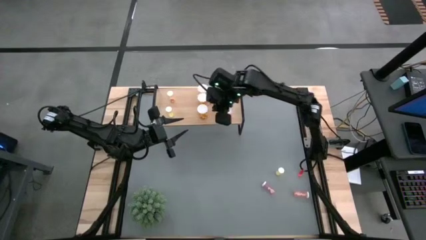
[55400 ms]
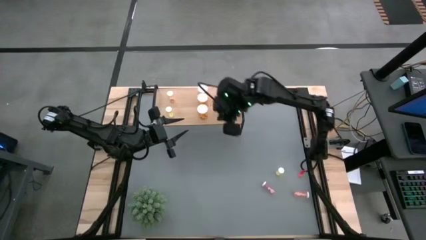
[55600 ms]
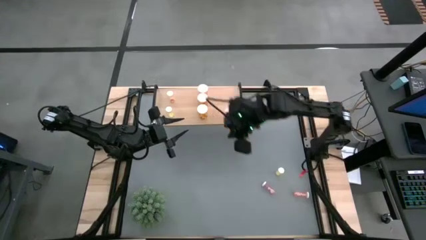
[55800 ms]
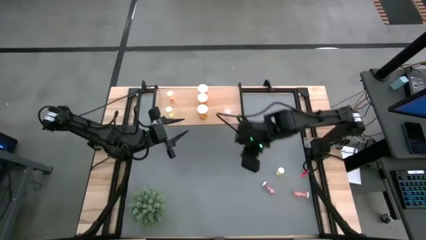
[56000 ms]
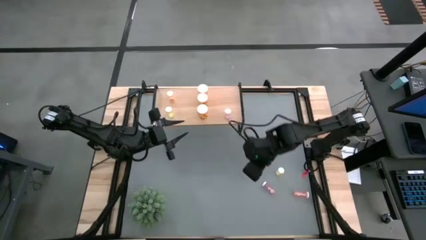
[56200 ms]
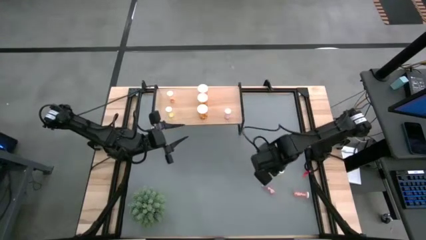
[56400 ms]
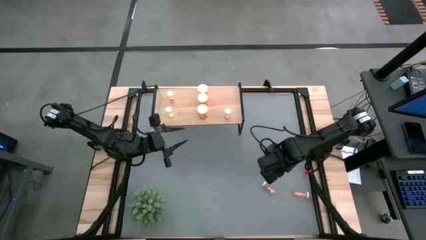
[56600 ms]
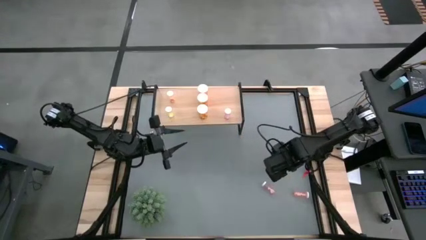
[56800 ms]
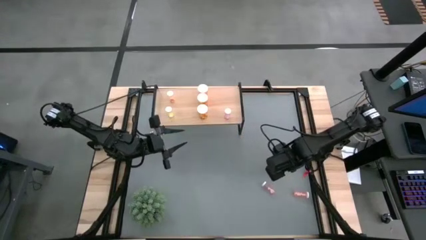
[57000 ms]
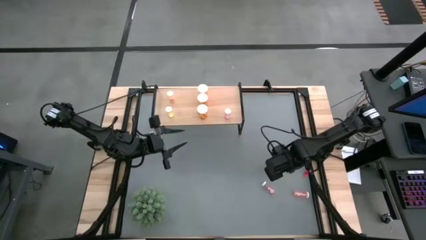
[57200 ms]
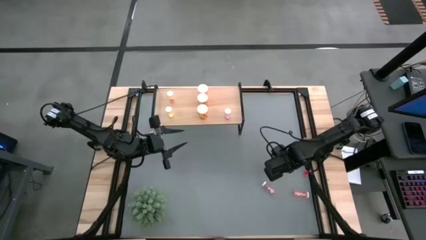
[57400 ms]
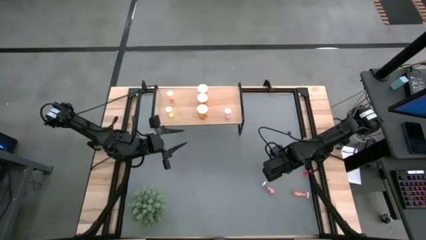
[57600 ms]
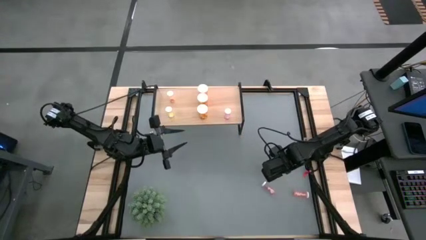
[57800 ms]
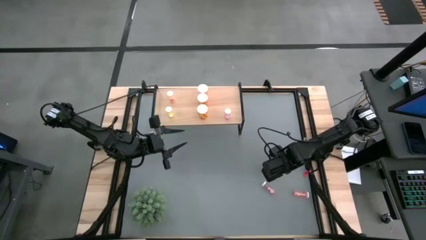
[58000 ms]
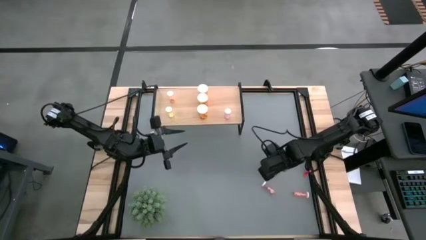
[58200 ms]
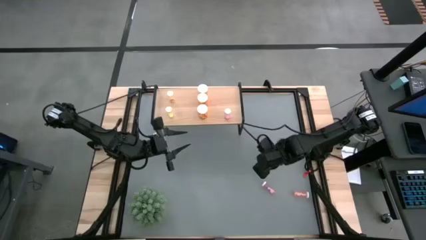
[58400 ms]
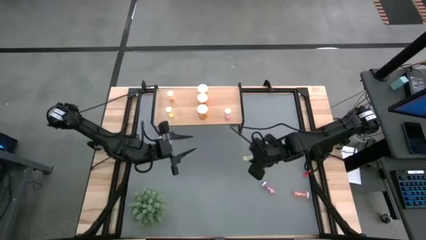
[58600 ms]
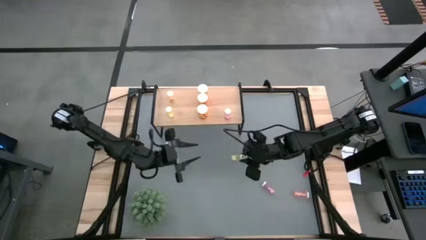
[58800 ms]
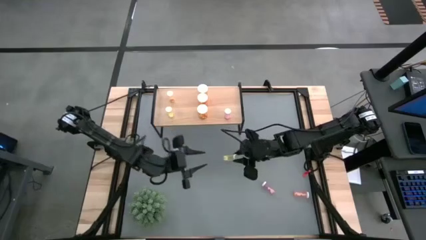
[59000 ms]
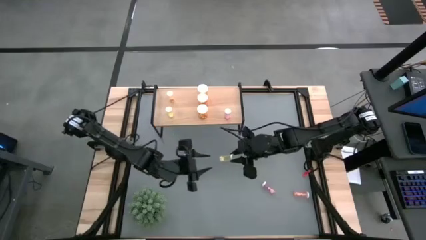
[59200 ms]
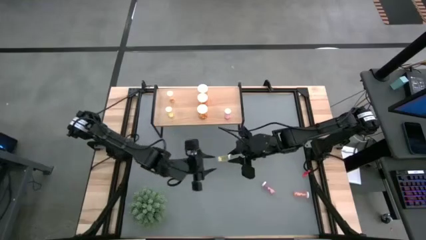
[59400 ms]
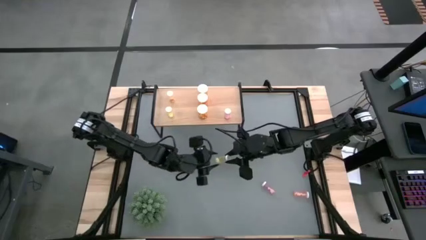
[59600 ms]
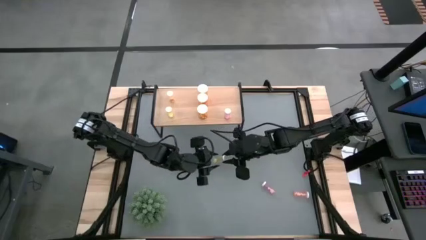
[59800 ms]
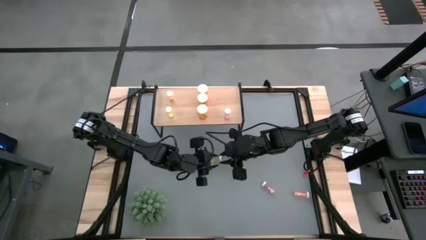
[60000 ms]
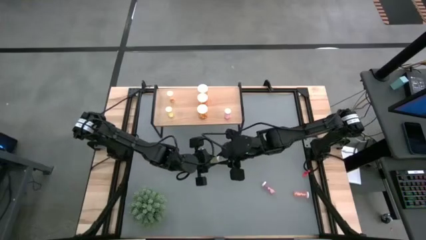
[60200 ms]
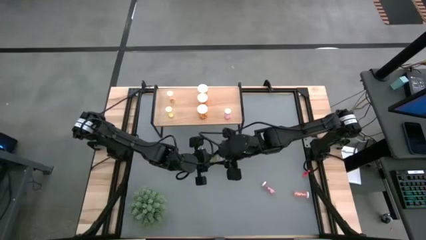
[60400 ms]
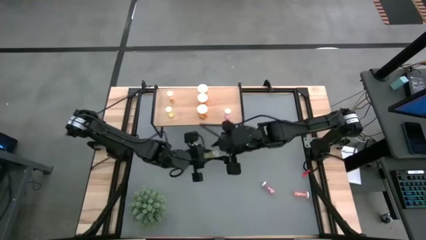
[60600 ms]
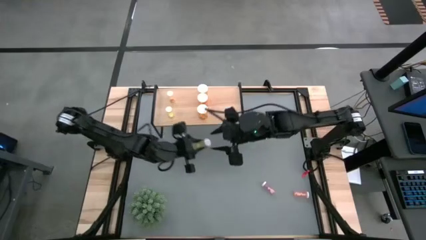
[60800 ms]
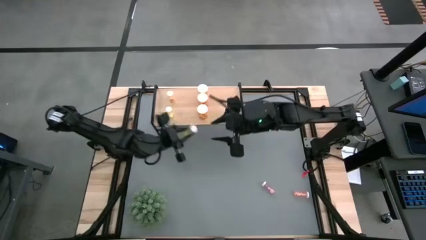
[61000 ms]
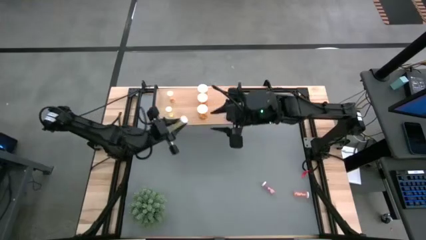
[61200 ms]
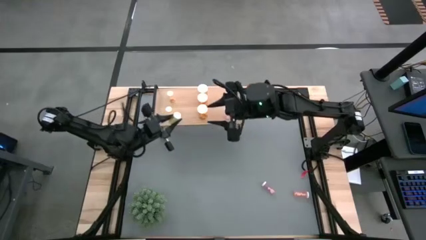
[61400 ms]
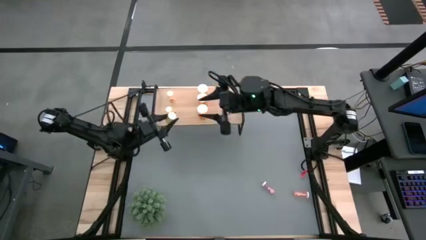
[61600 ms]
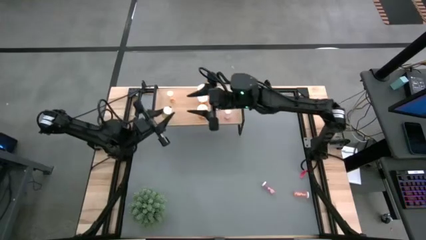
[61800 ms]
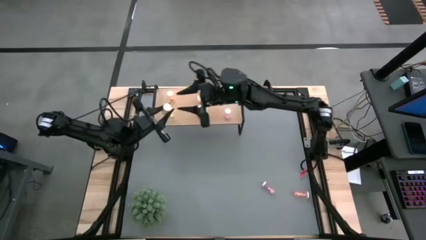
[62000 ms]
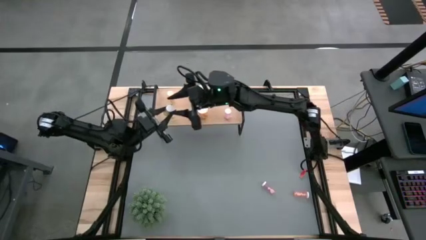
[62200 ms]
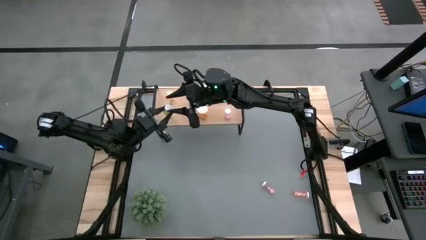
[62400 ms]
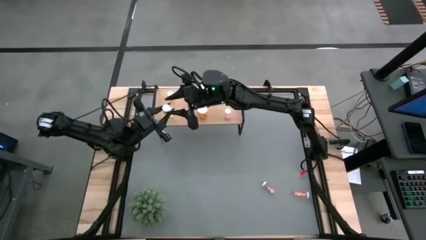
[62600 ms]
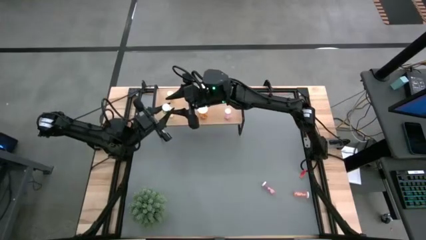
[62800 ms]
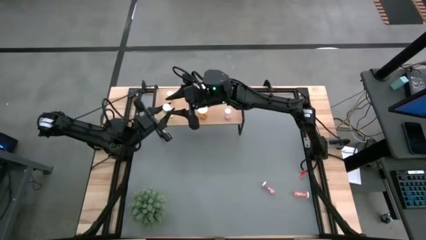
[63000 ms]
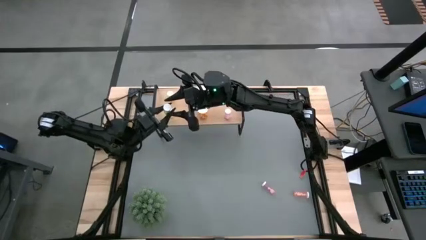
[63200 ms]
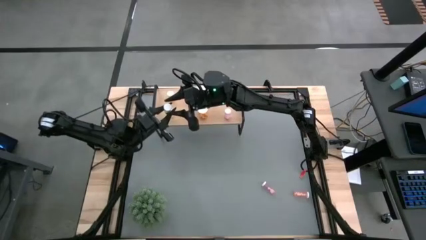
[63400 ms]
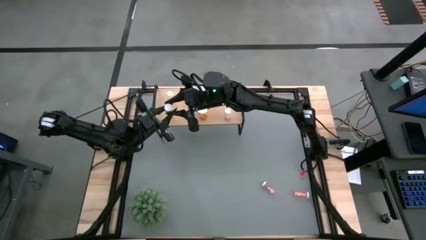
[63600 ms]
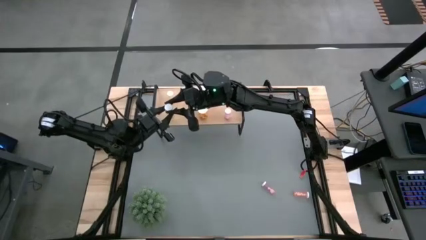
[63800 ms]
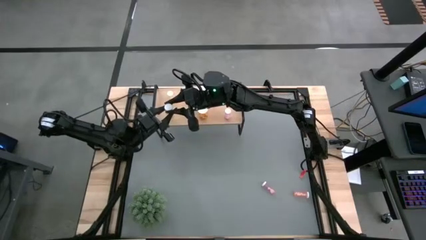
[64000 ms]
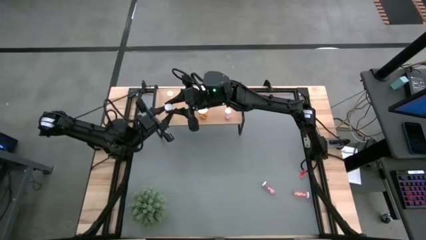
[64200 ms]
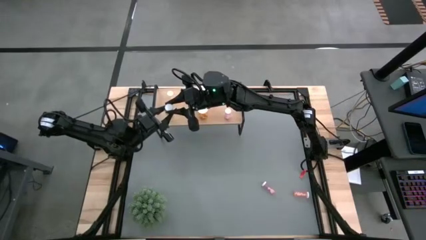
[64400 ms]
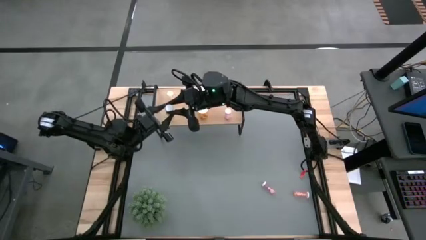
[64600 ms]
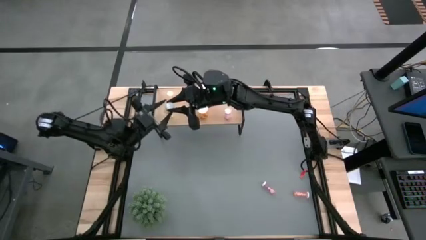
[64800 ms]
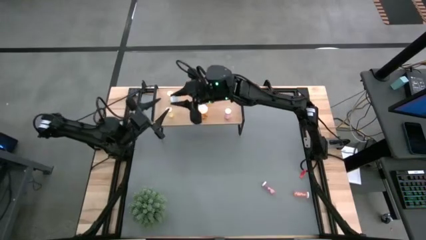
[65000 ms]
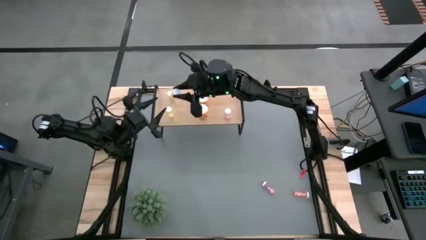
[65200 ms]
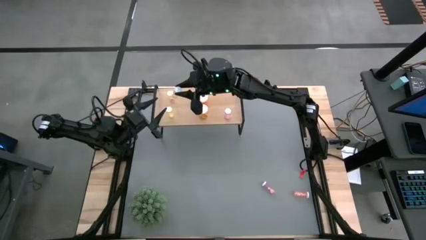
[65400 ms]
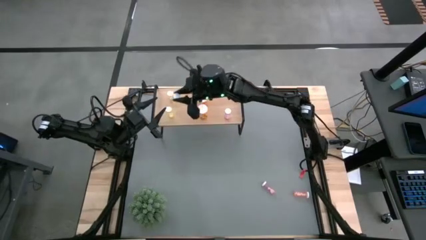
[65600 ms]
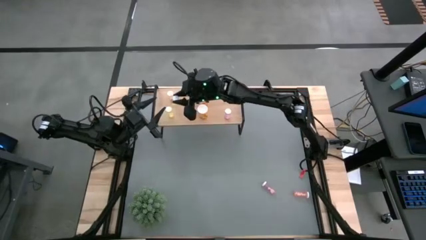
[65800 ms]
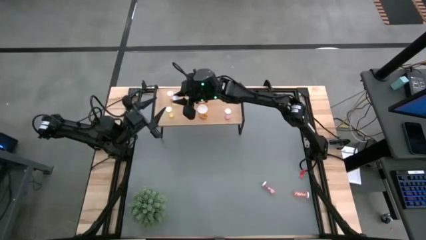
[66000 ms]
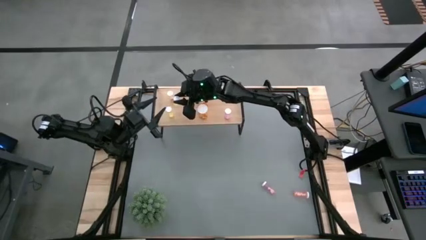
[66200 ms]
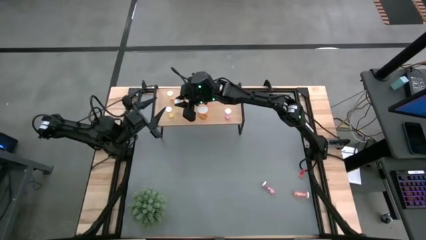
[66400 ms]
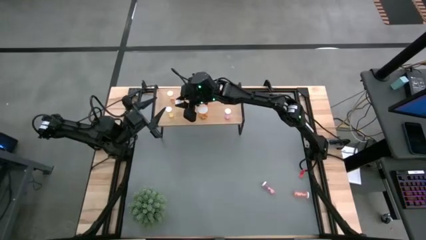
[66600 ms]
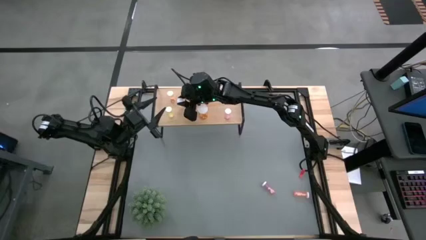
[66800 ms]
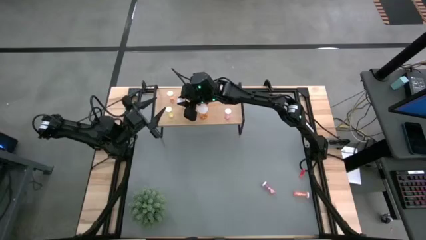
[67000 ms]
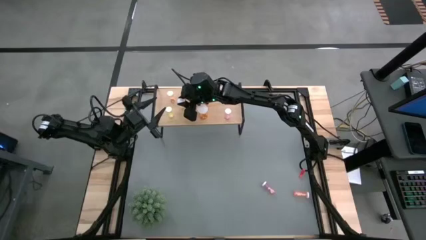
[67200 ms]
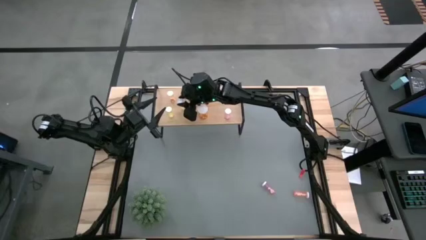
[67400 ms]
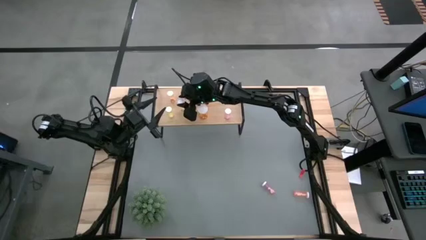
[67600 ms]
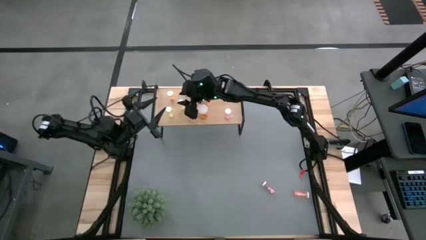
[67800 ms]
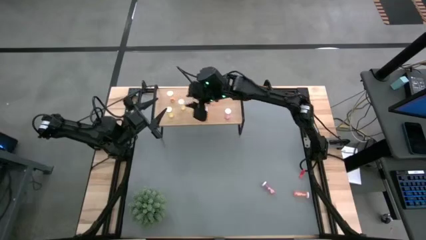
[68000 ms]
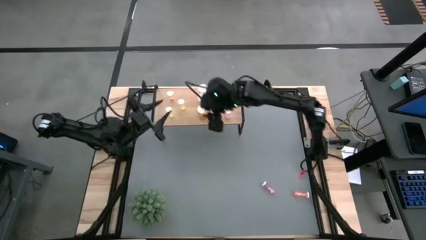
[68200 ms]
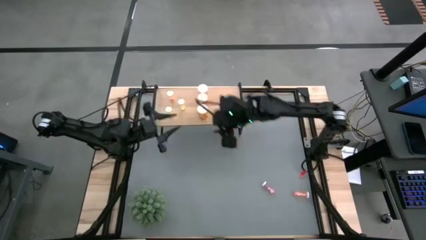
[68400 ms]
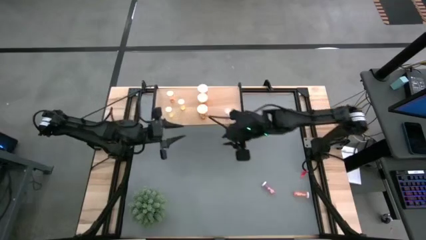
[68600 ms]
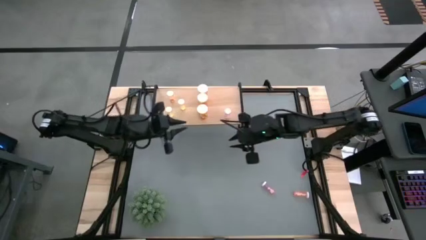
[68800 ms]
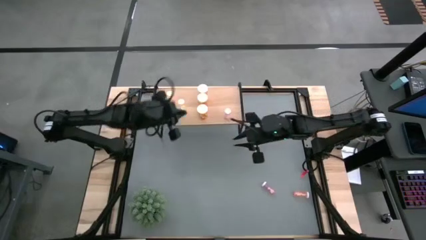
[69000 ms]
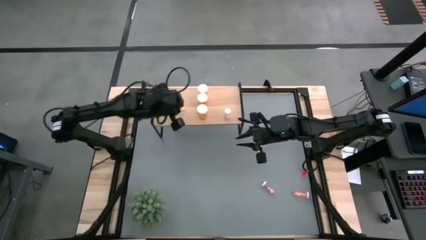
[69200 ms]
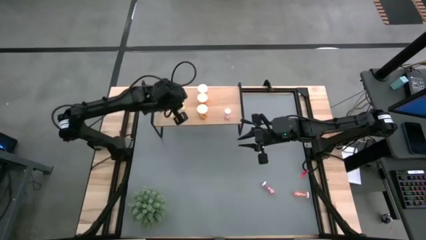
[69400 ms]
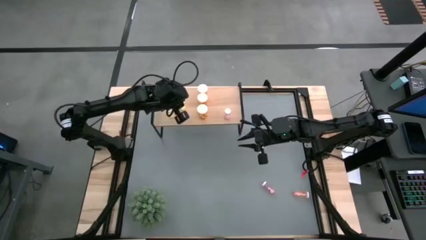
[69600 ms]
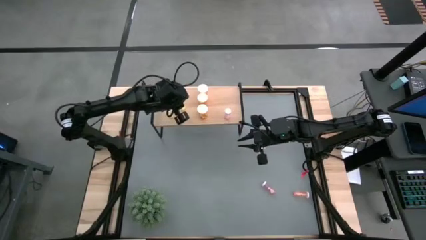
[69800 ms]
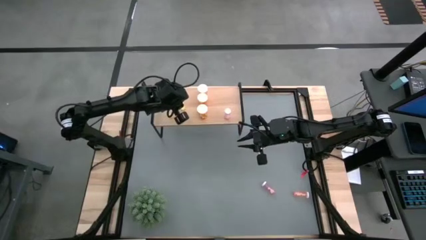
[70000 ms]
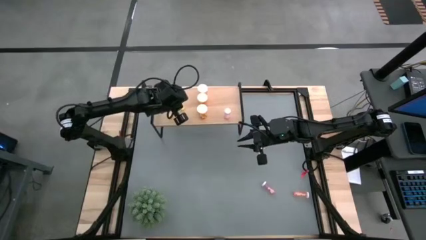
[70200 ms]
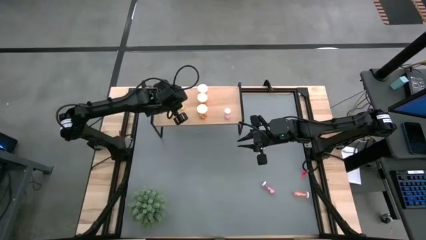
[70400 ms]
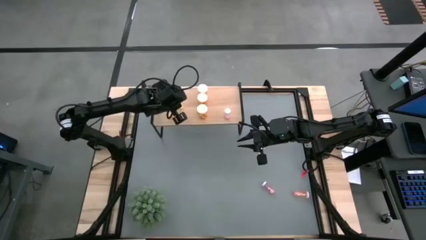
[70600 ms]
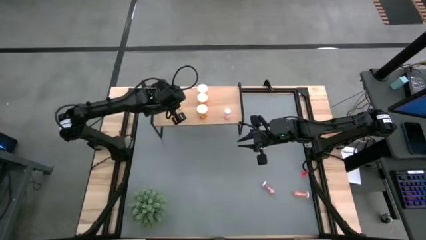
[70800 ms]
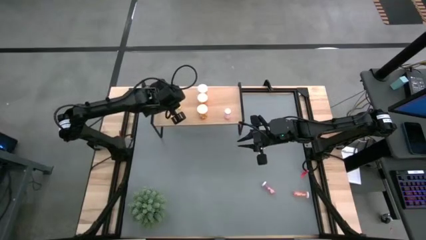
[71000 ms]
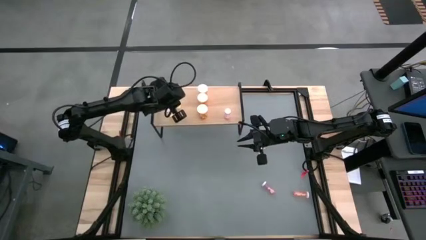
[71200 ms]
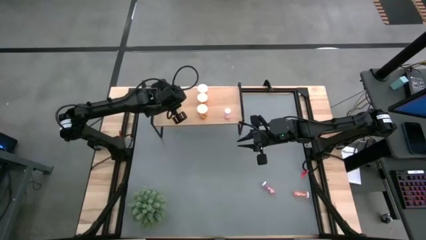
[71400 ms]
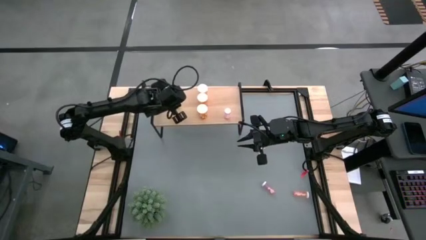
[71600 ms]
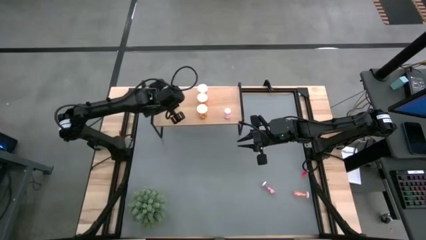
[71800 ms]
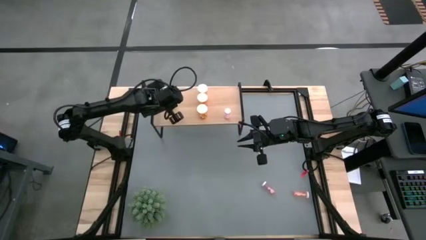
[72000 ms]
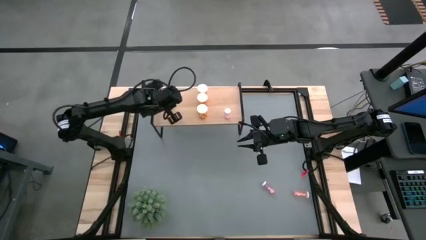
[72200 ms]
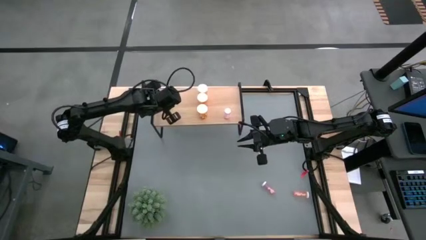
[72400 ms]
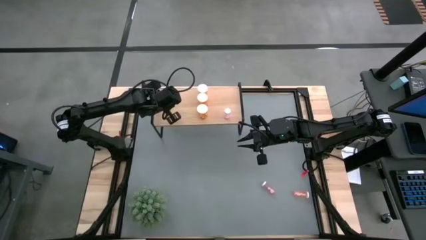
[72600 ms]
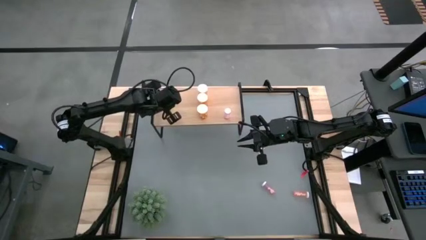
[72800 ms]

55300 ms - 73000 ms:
Task: Pick and place medicine bottles onto shelf by color
Put the yellow pill bottle on the shelf aligned with the yellow pill bottle
